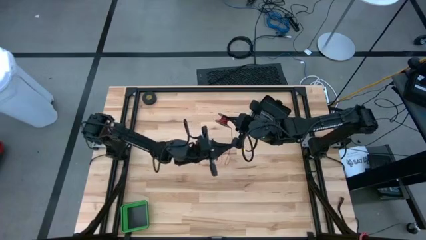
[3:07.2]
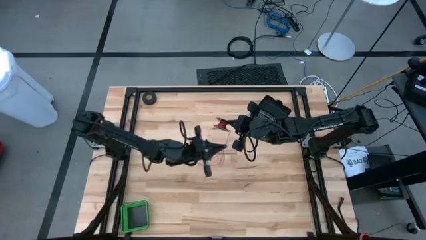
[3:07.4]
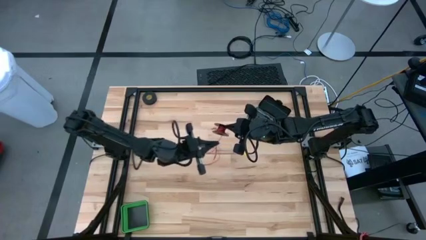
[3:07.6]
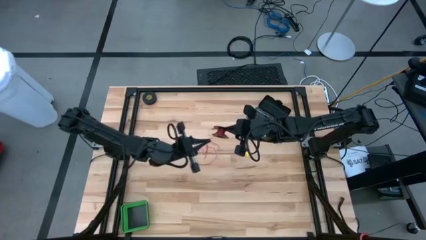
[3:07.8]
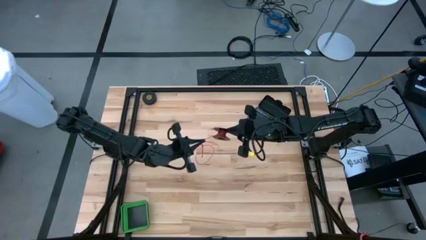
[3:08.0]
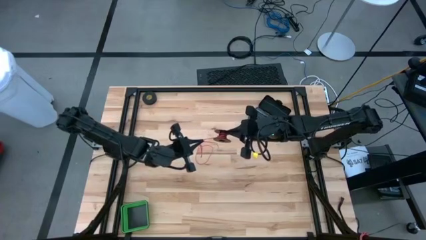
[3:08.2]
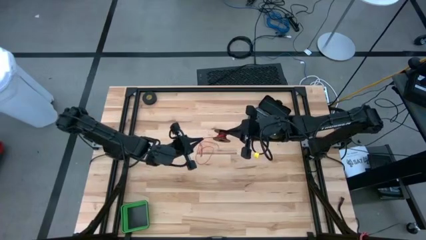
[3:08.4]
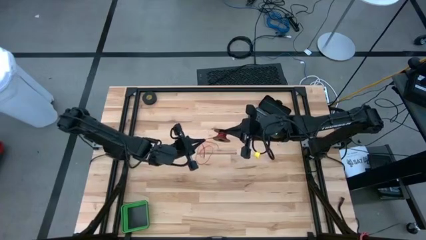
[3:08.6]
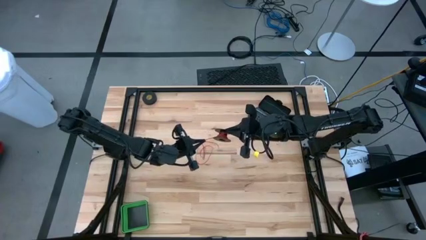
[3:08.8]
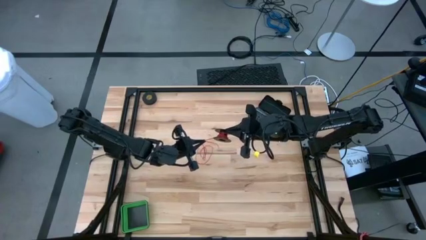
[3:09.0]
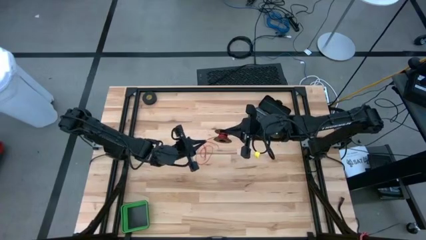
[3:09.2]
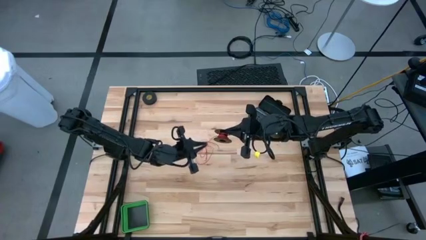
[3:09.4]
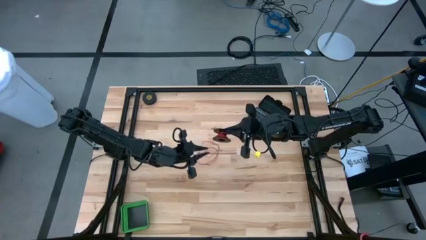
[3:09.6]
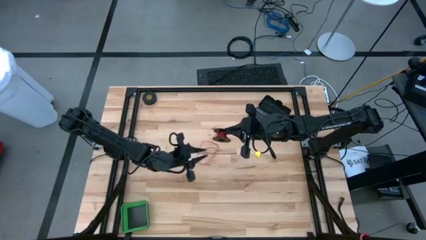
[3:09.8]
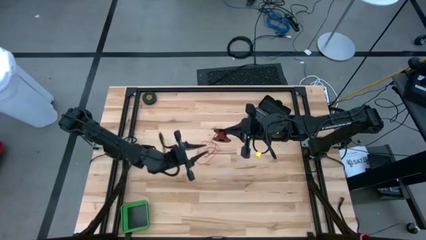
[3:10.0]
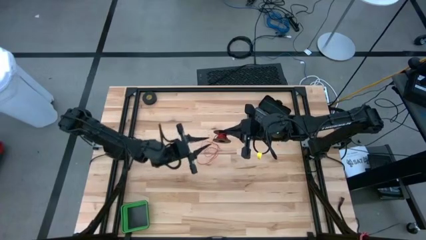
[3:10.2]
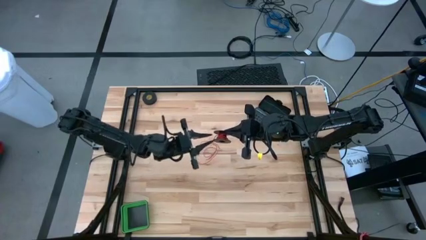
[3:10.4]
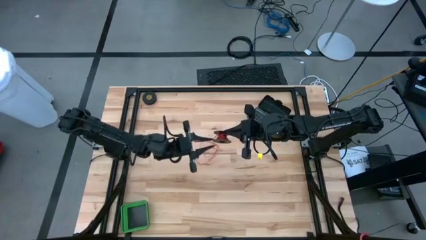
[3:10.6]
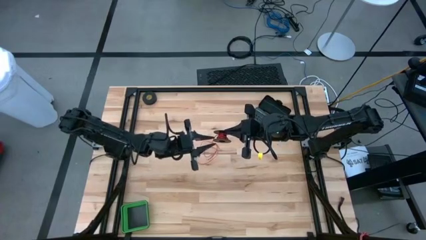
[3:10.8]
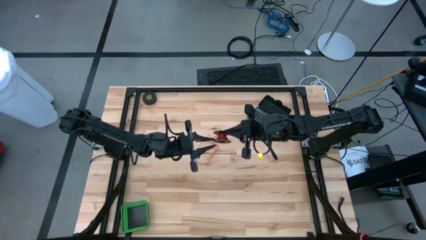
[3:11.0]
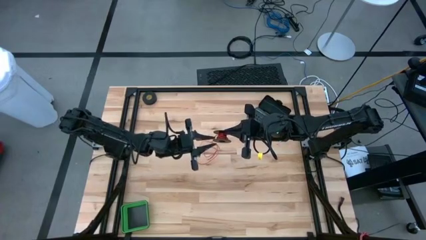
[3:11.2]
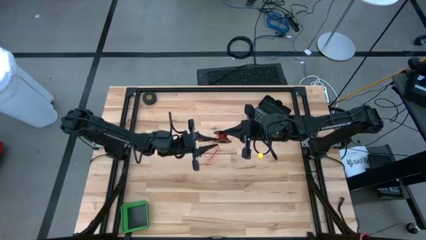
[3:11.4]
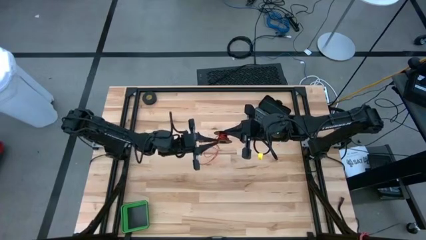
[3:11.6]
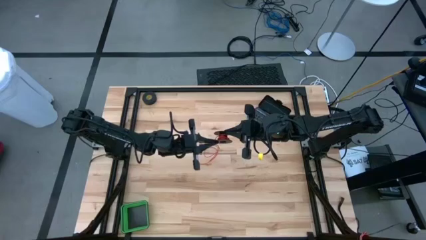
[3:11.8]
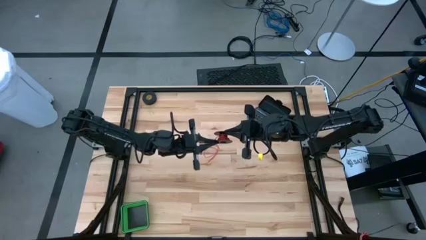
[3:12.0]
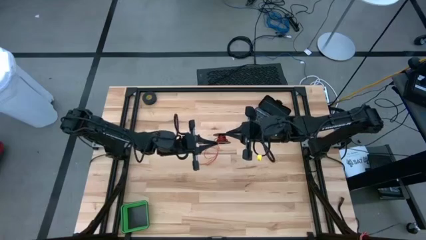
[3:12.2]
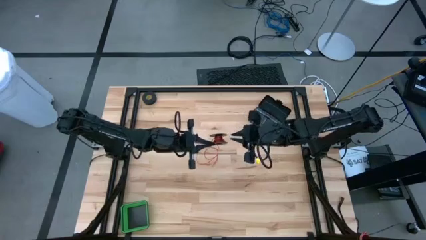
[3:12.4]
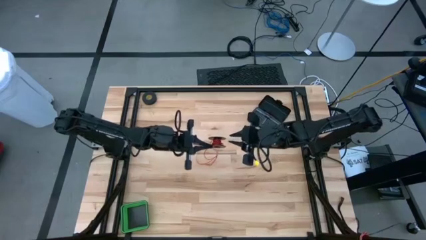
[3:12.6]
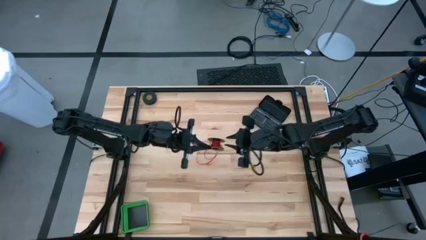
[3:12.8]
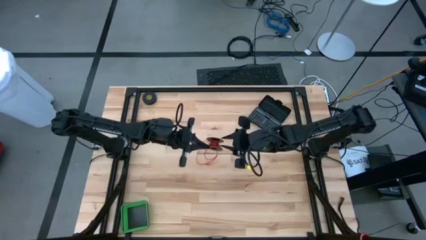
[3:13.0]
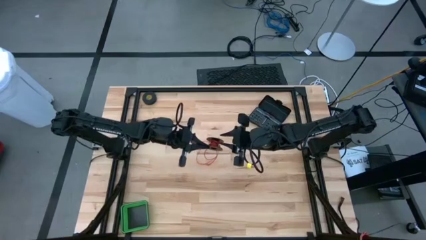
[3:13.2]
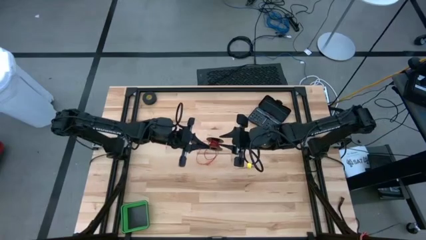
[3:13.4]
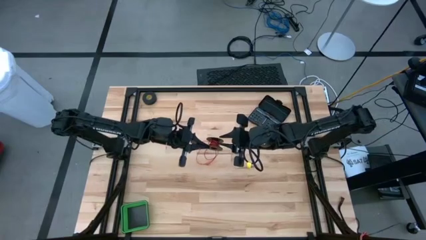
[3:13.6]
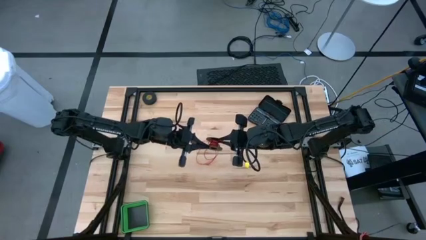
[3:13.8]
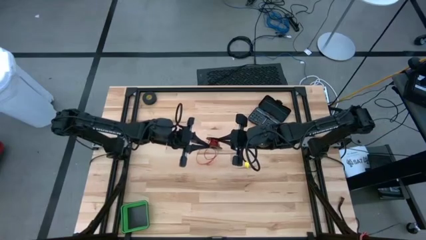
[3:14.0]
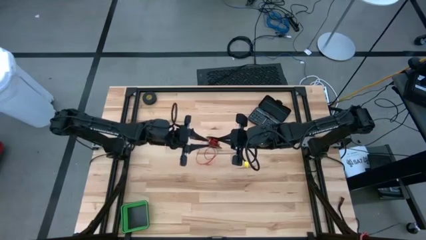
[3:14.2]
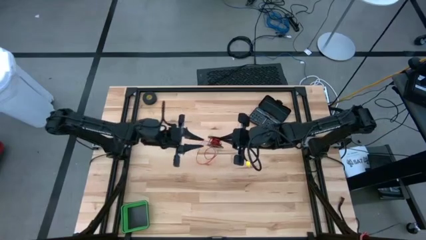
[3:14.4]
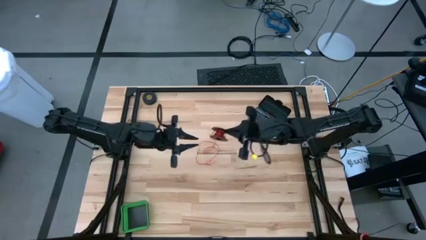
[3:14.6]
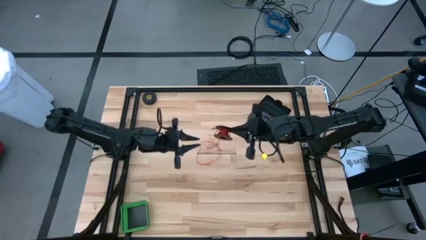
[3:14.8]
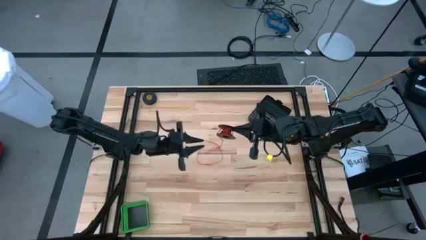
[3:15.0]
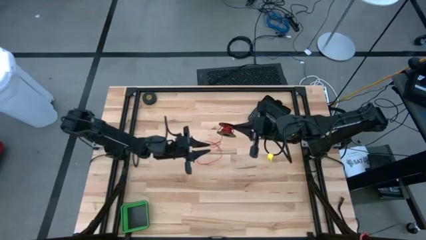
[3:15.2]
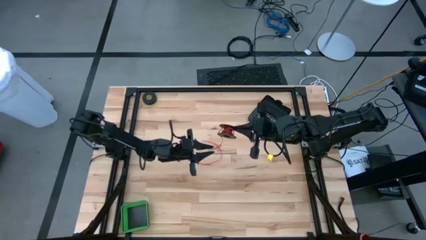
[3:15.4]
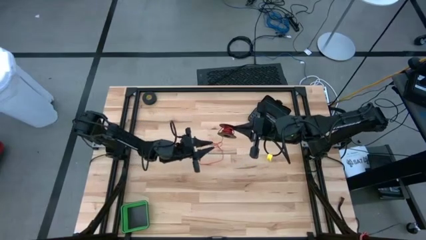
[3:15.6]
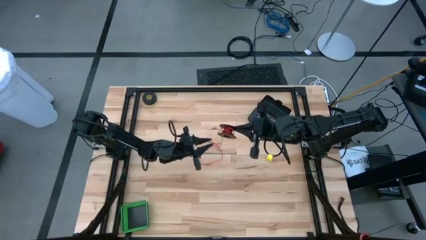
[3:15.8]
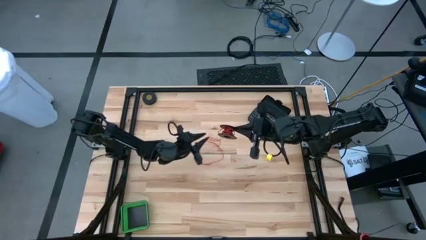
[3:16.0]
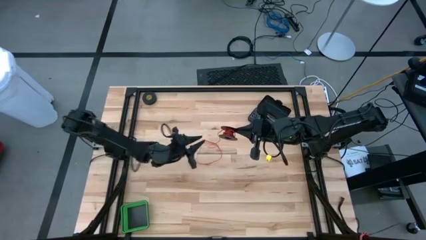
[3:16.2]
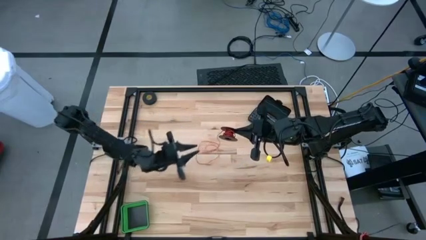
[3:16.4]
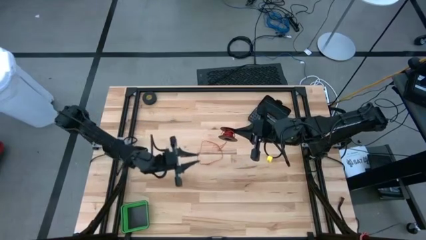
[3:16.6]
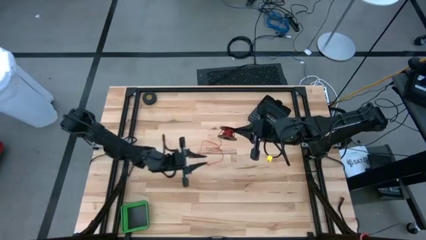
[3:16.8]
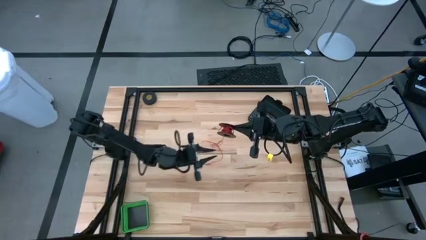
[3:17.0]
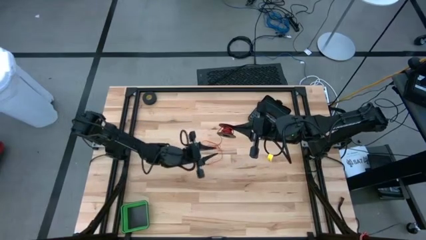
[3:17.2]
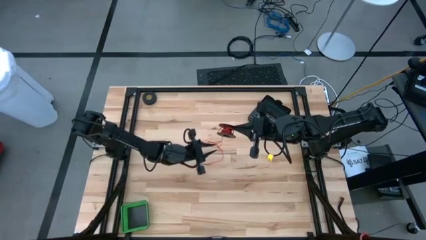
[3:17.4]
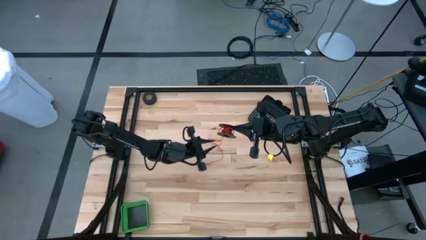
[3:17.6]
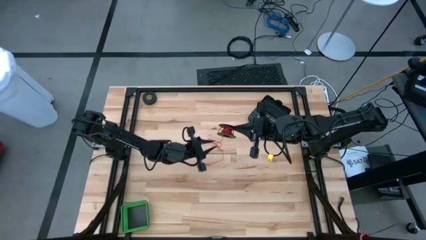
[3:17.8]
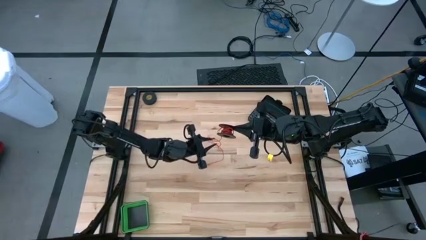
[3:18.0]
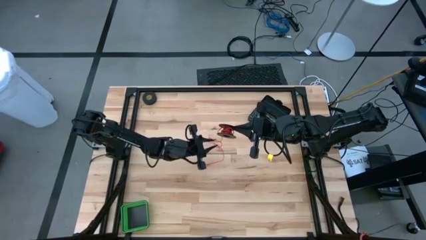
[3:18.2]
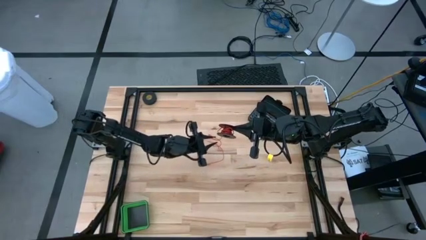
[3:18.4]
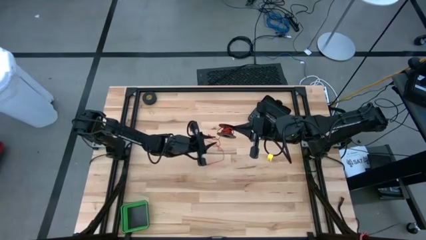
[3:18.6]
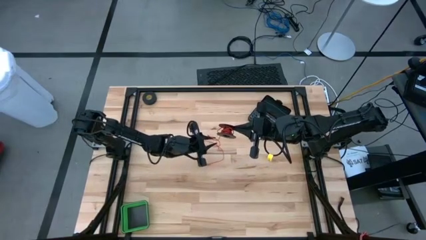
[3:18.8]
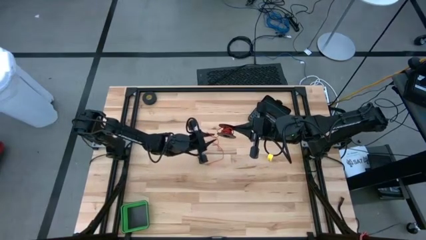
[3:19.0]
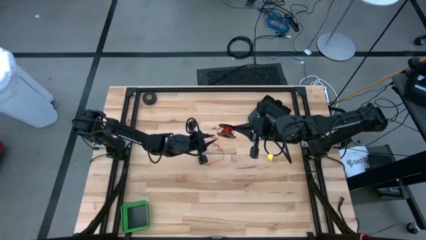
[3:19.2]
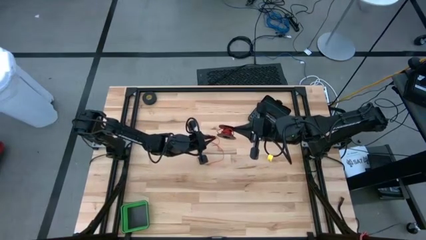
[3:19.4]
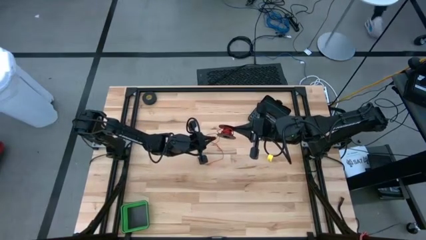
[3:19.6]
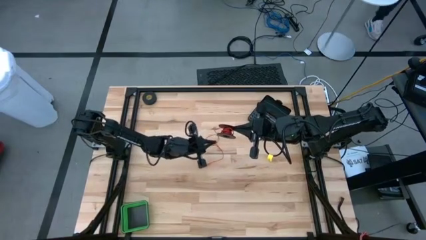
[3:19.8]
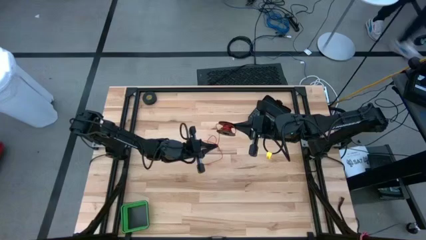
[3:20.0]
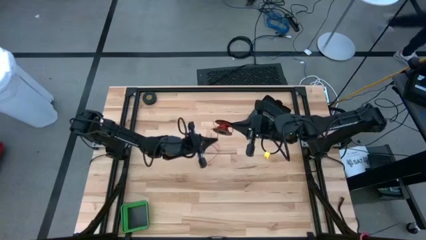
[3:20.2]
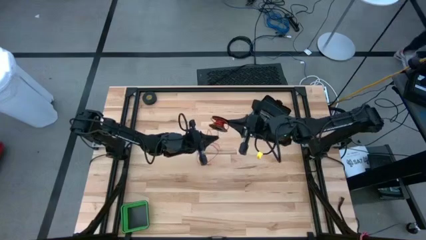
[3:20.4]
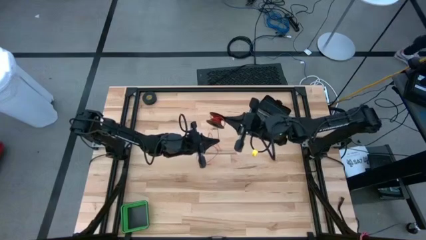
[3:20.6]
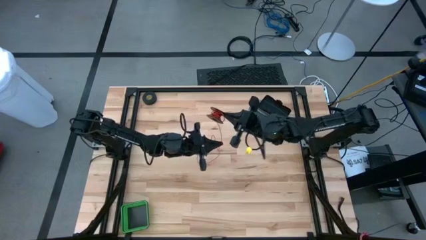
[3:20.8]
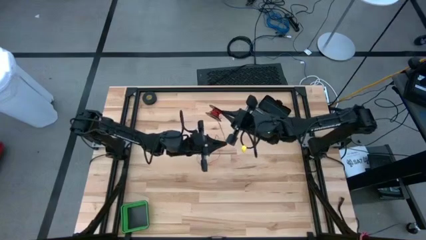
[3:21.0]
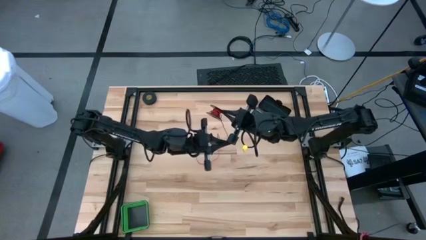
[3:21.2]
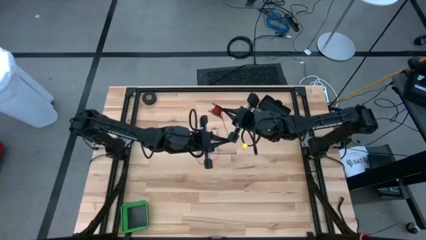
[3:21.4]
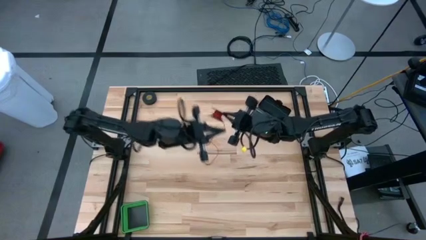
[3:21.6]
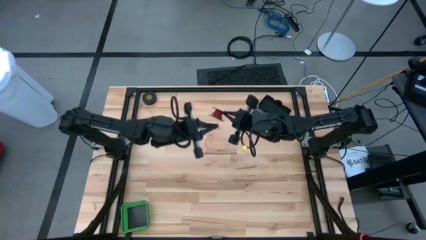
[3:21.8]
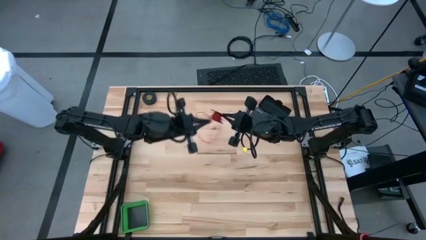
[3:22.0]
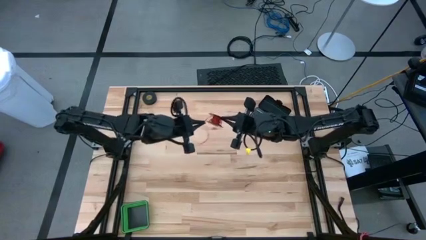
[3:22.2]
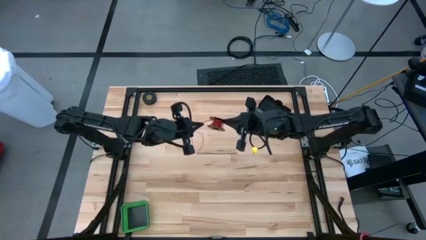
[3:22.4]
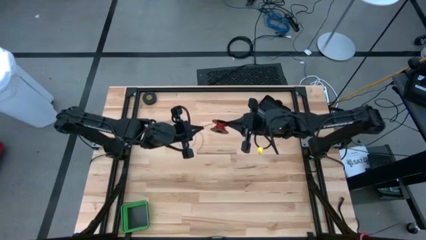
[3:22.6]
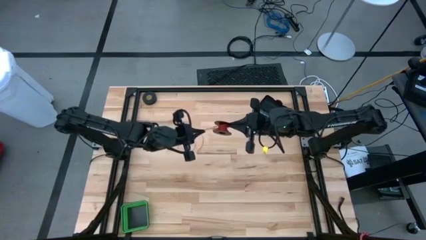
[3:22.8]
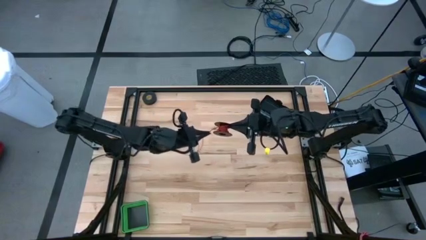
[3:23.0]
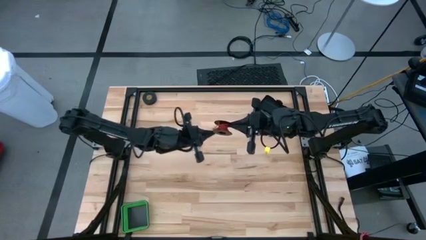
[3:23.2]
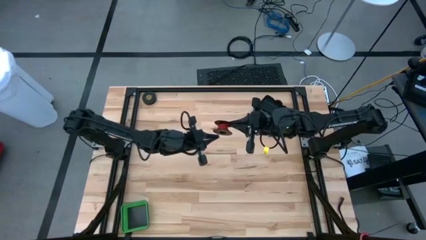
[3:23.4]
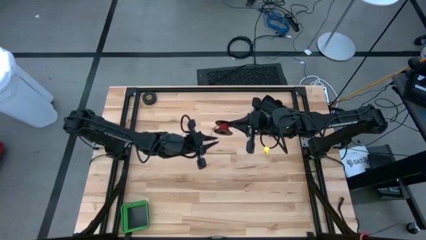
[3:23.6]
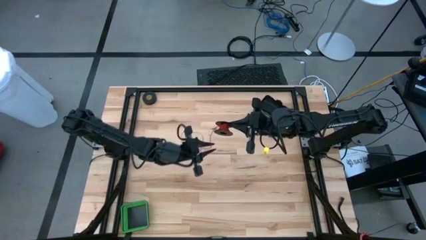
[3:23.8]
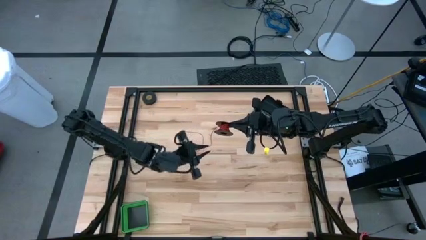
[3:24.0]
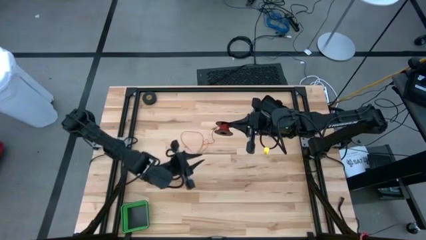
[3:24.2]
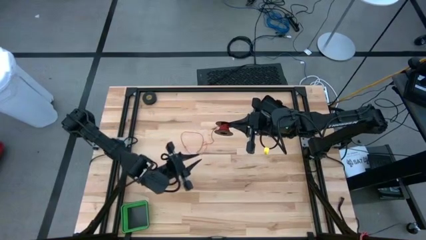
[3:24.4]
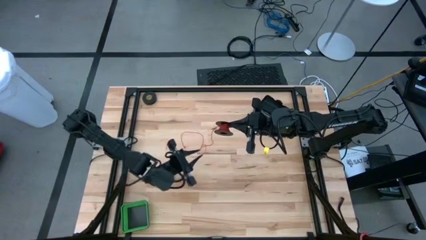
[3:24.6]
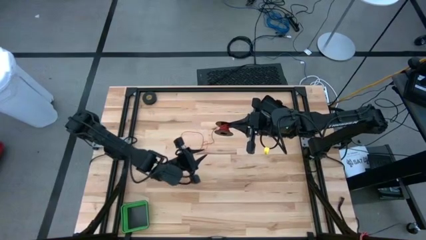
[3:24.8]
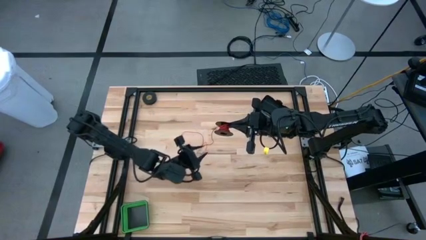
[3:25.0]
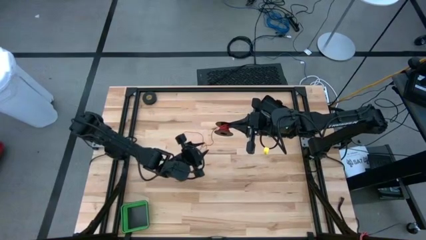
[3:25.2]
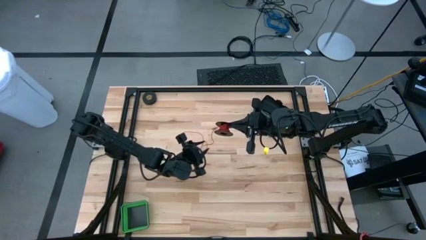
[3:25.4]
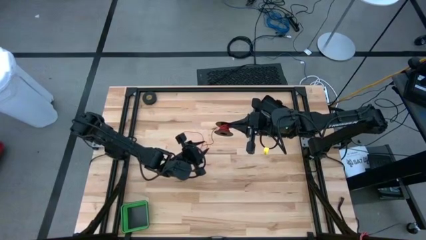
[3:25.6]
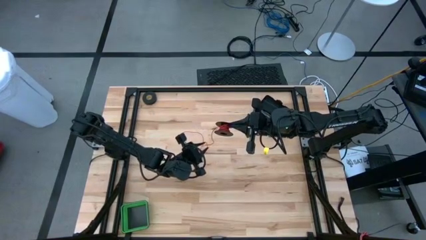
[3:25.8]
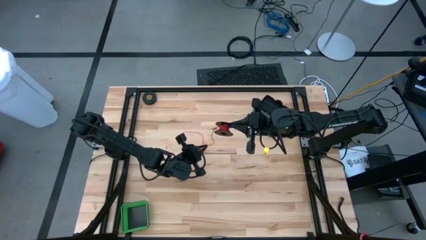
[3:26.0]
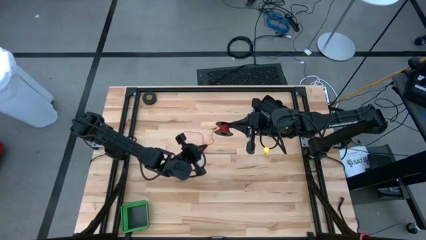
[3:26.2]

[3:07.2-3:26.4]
Task: Coil cords
Coil the red wire into the spool
